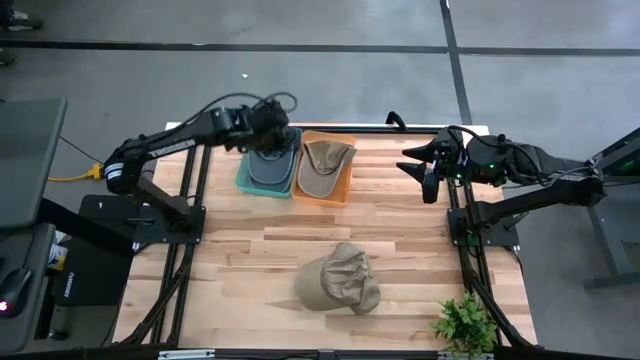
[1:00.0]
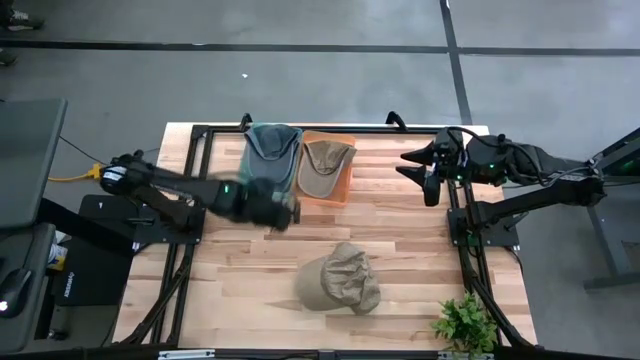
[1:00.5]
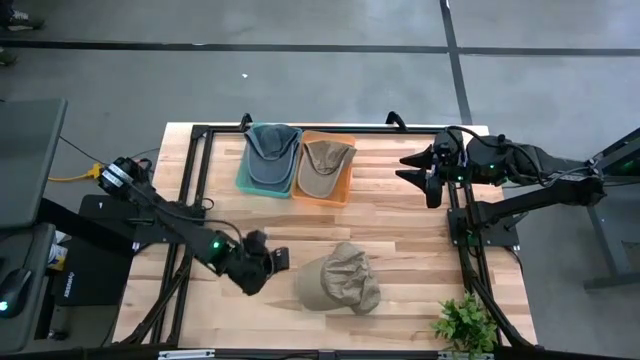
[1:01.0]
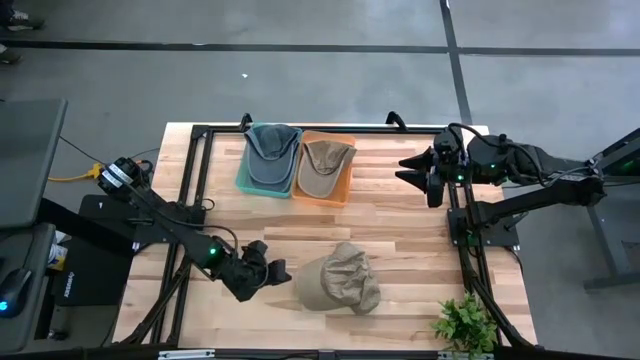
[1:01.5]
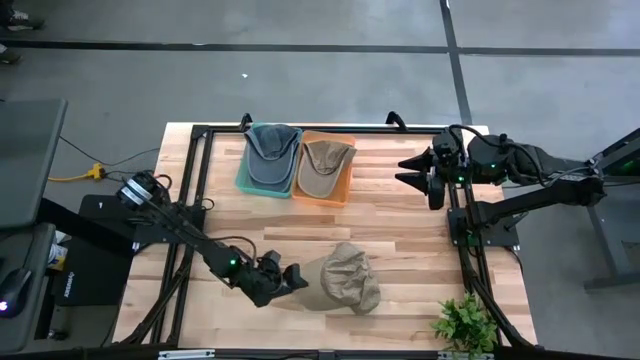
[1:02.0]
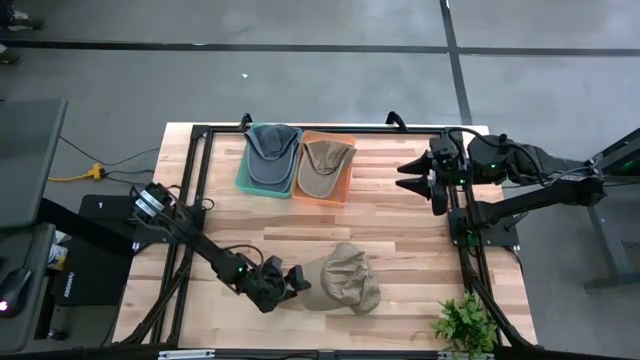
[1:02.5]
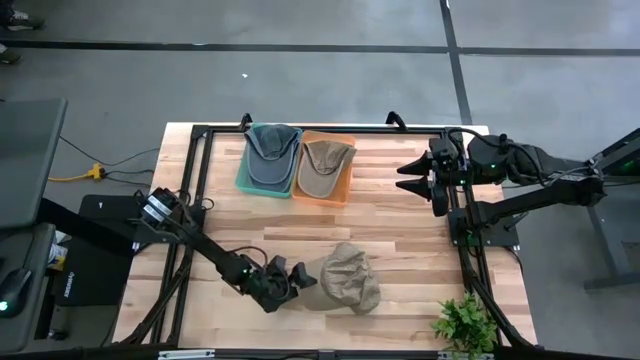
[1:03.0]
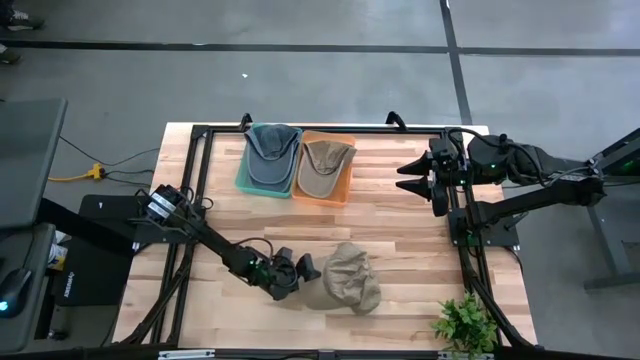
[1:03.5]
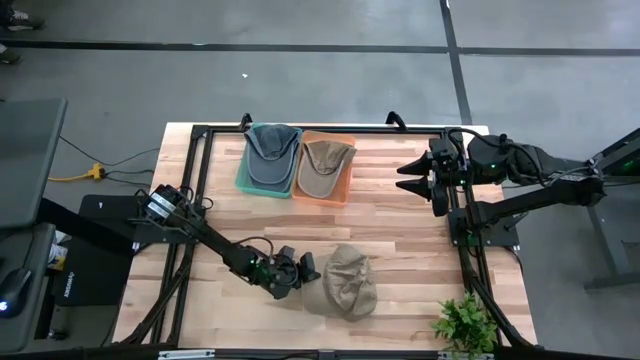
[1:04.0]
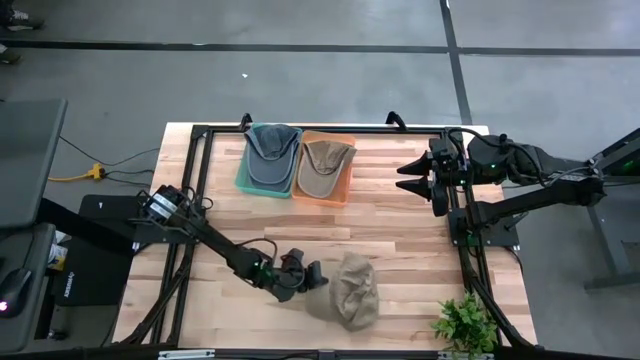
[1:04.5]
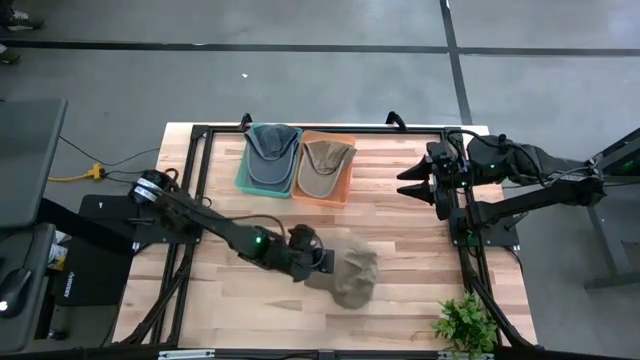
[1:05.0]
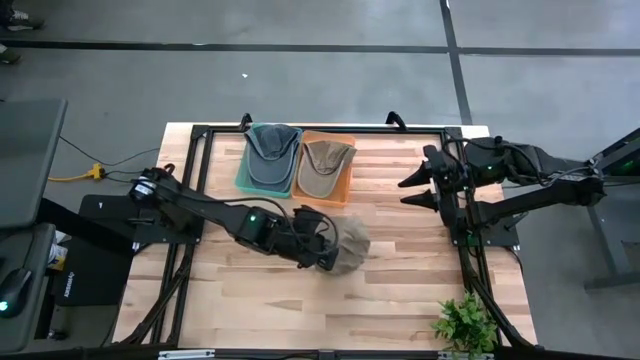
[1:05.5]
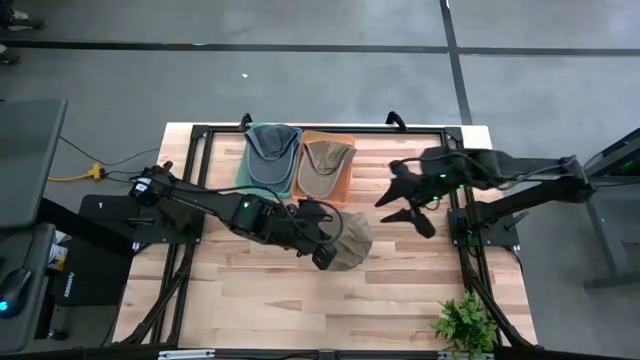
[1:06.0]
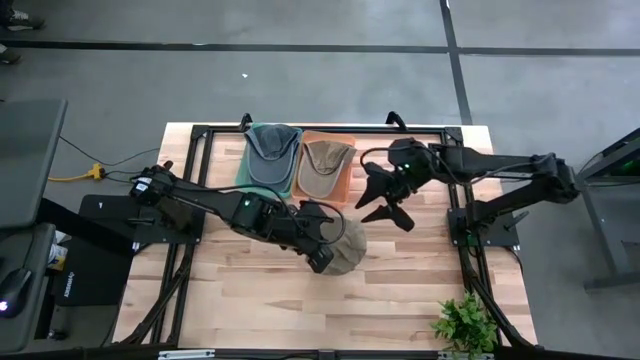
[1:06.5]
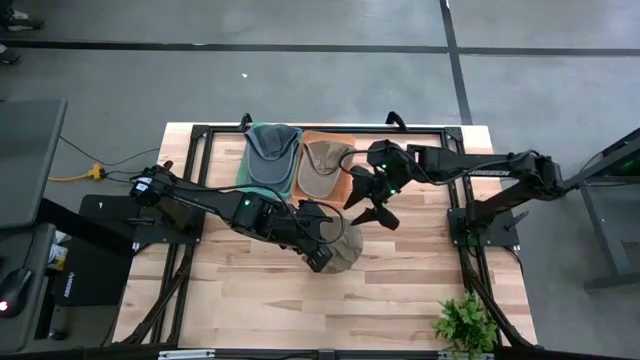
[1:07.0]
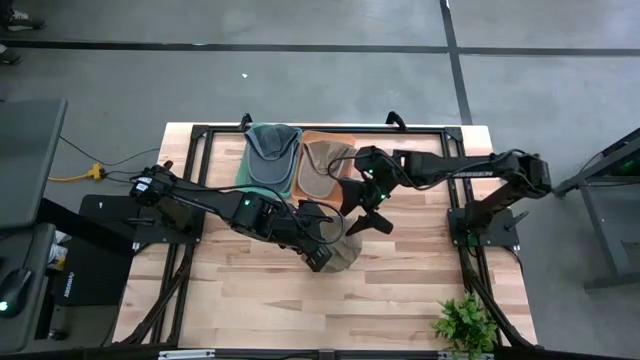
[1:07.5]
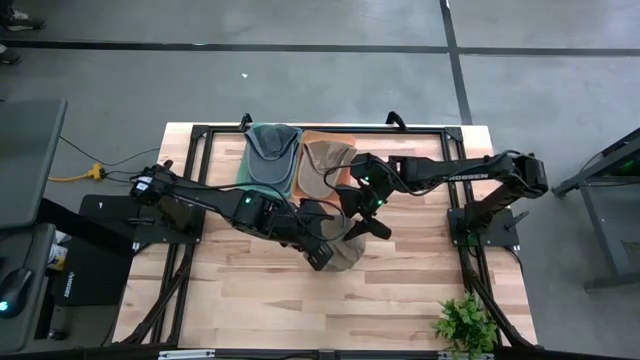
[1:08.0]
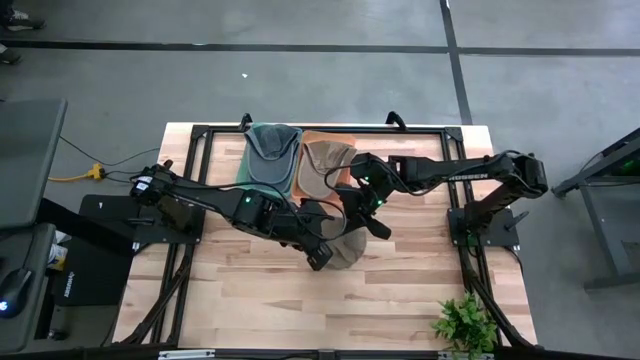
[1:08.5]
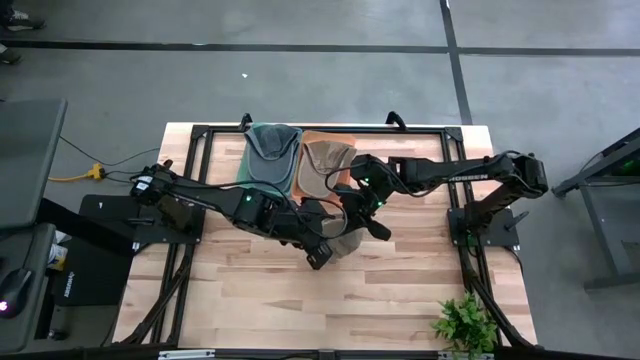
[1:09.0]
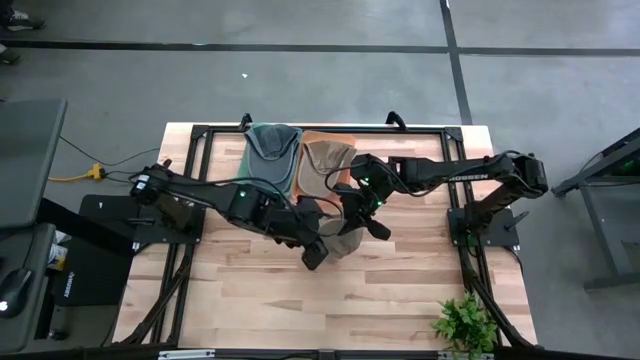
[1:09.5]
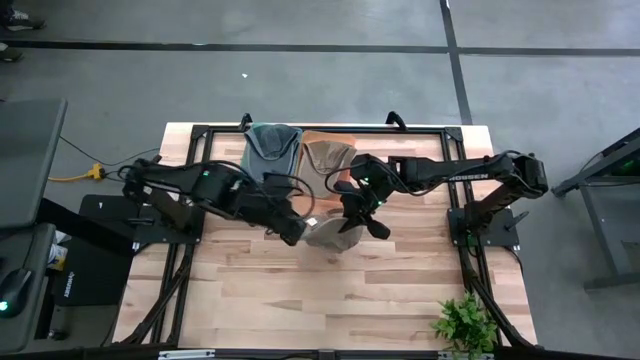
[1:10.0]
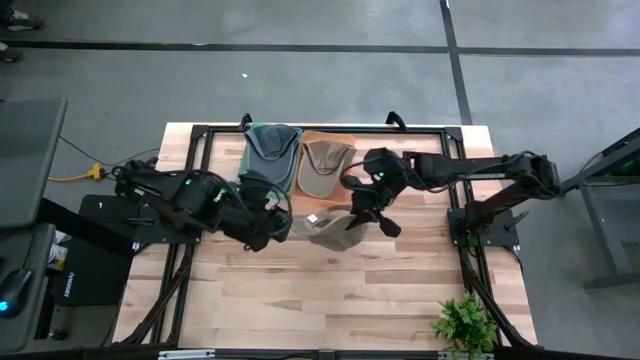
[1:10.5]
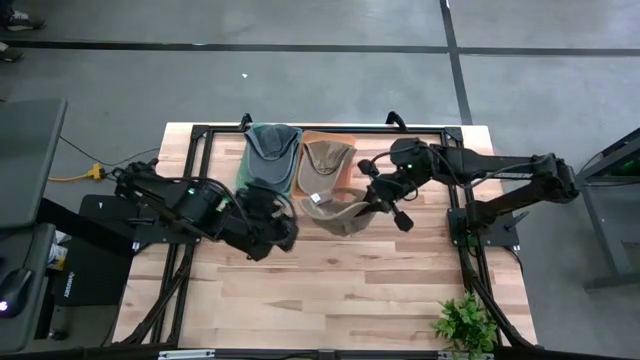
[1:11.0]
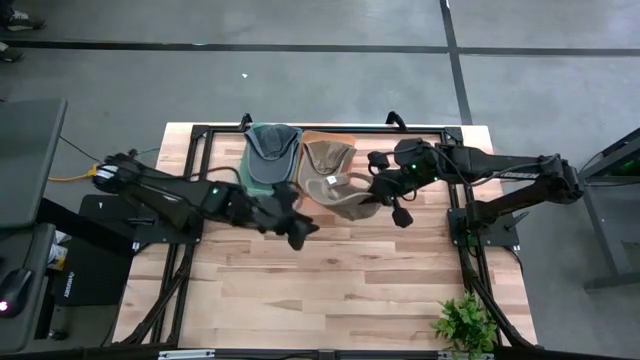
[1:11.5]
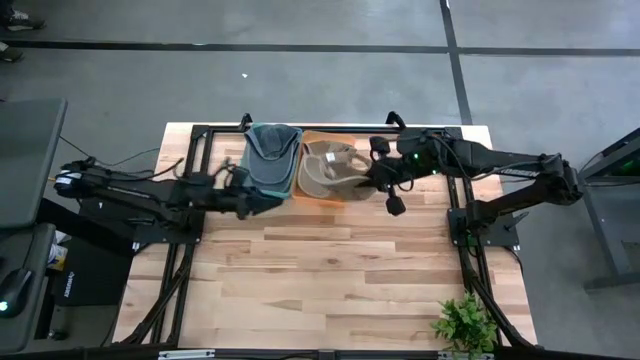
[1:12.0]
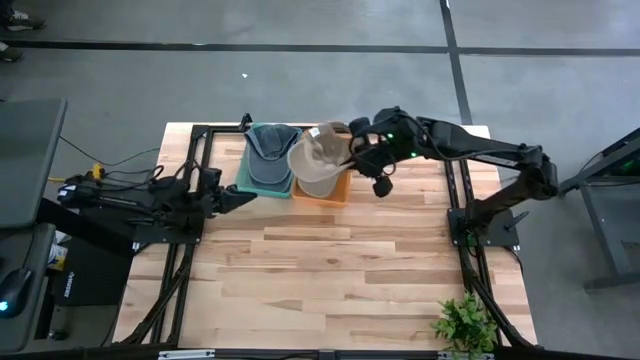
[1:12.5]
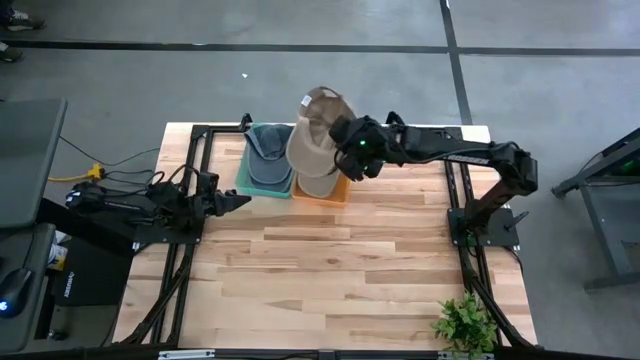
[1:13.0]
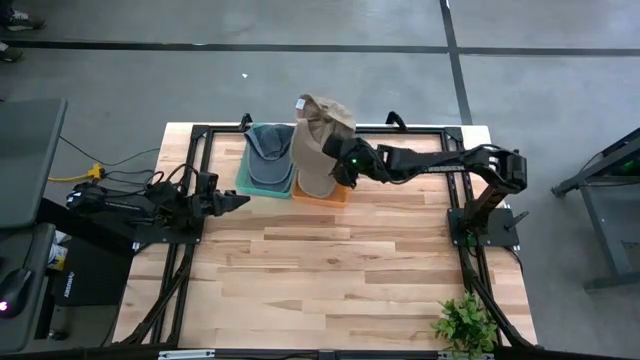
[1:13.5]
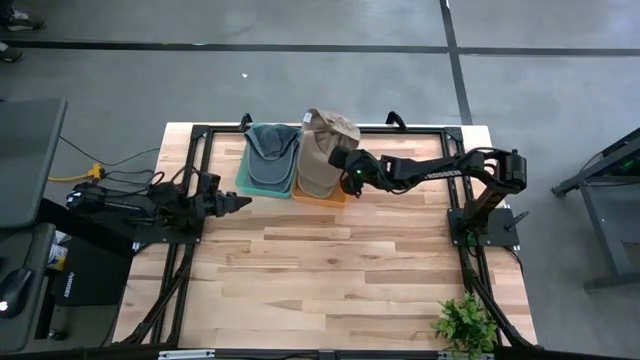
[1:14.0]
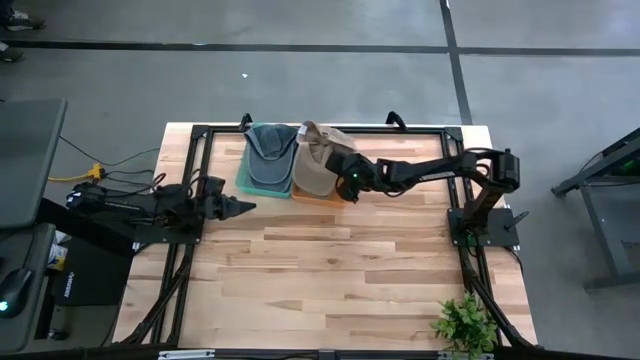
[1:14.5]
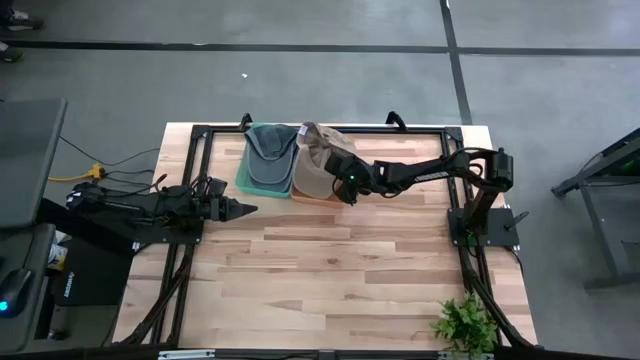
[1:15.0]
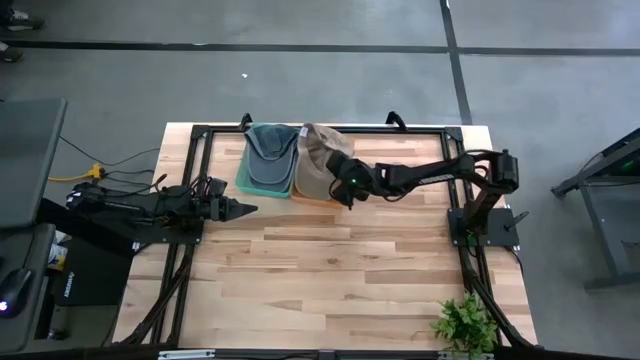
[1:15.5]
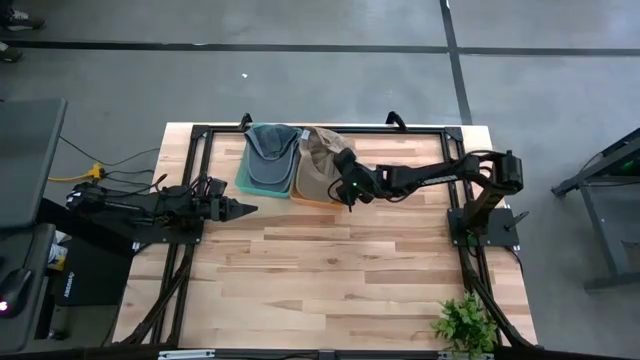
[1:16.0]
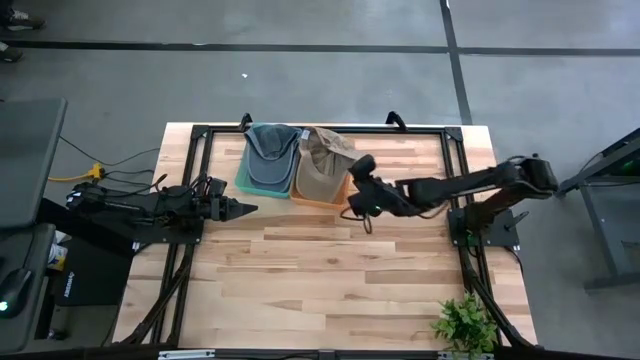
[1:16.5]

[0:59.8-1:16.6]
Task: Pick & Place hat
Put the brown cap into the orange bin

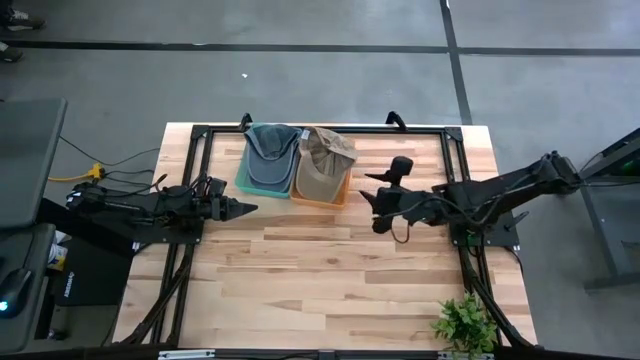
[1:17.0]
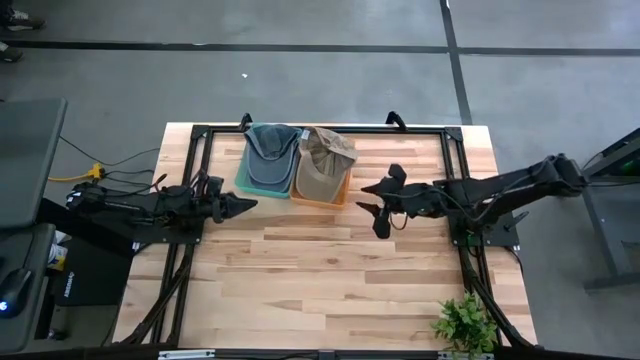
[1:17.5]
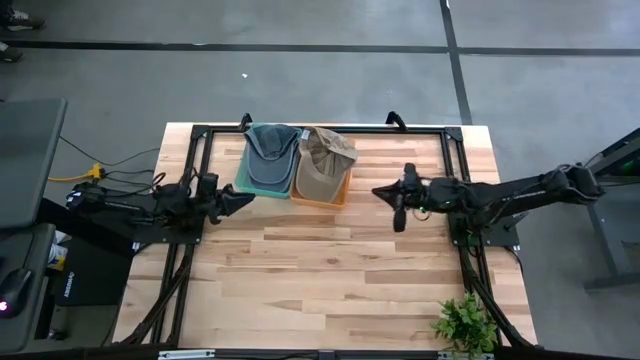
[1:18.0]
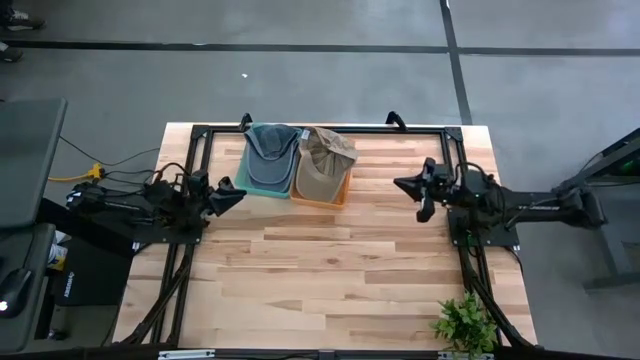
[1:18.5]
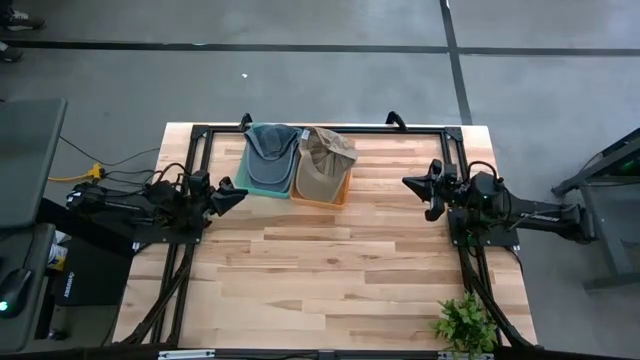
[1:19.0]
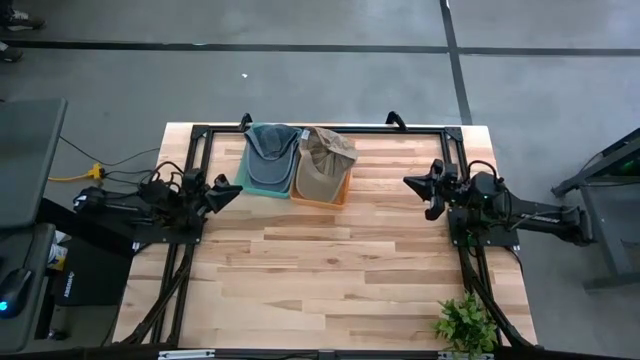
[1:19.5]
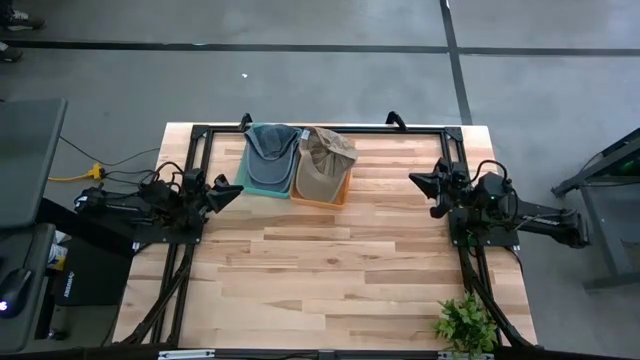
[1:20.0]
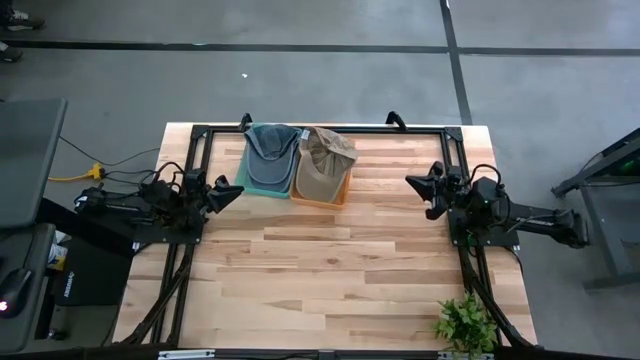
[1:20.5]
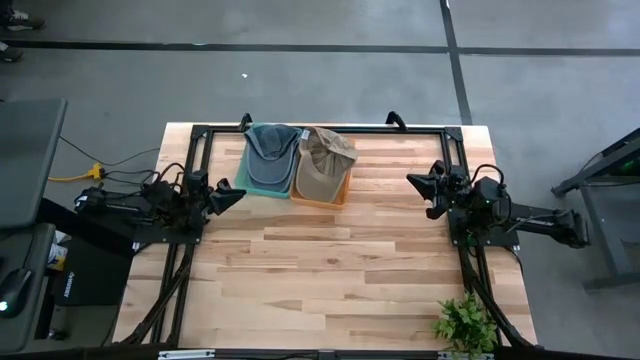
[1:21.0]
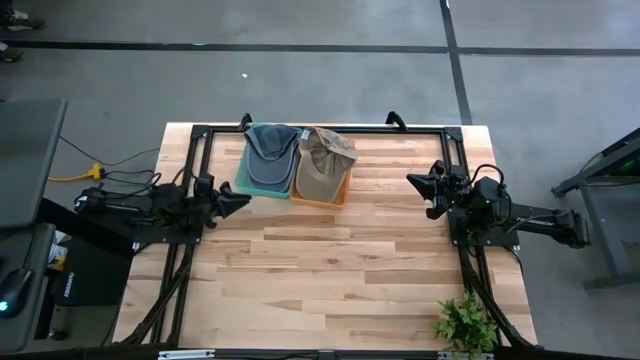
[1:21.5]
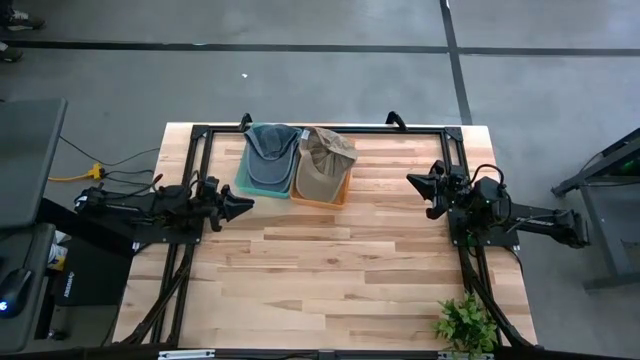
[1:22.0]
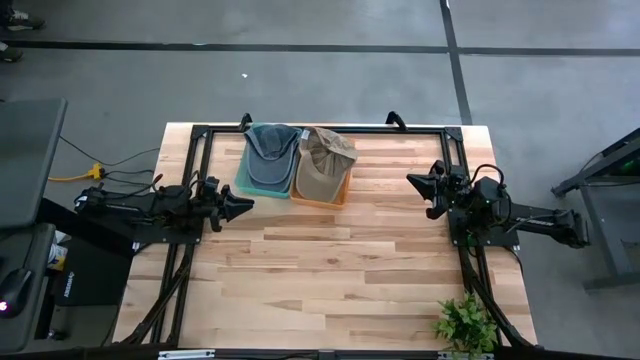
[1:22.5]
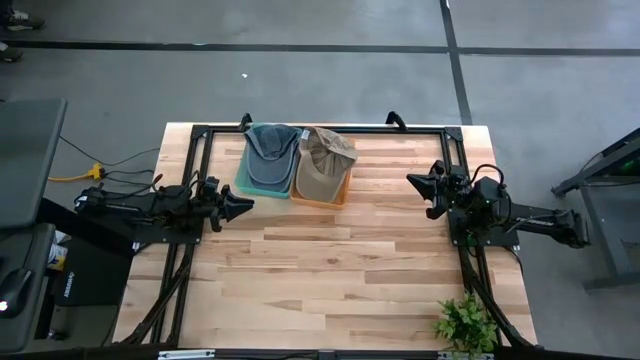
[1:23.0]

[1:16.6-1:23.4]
Return to Home Position
